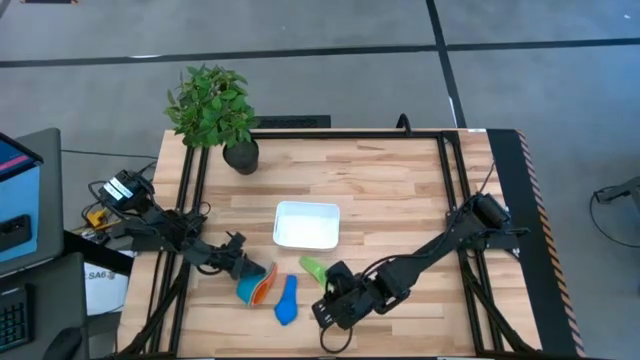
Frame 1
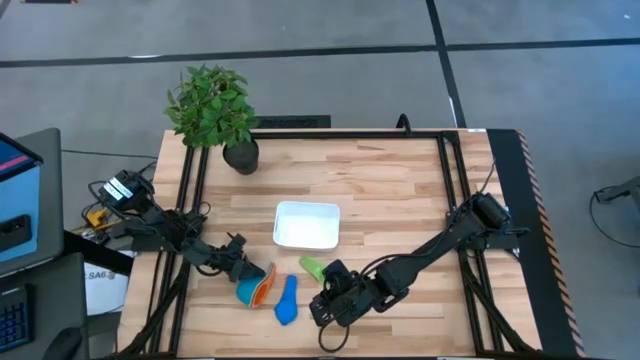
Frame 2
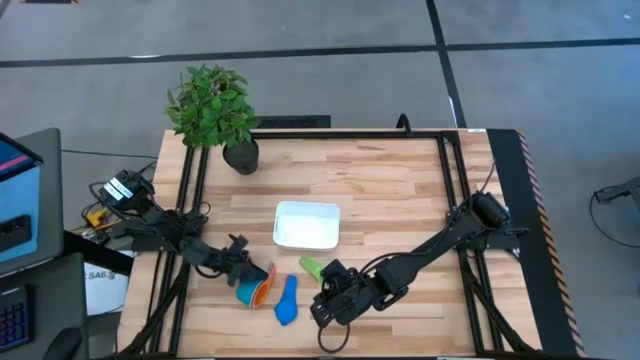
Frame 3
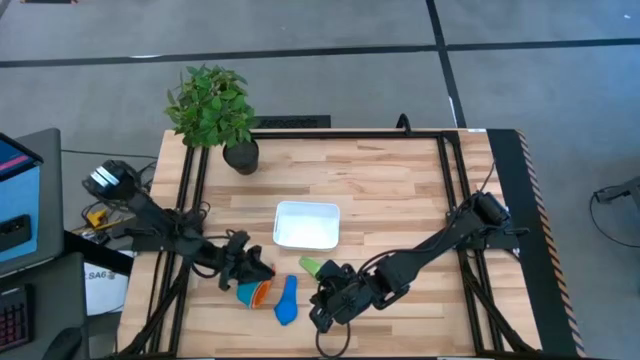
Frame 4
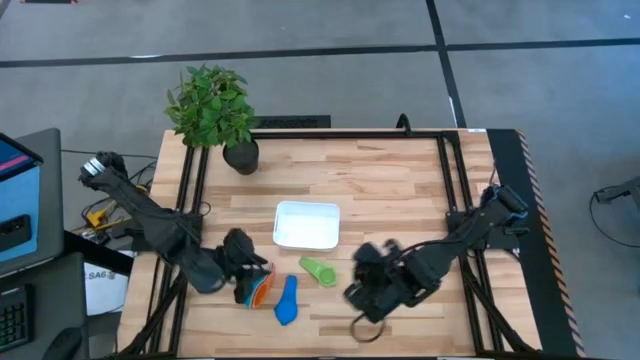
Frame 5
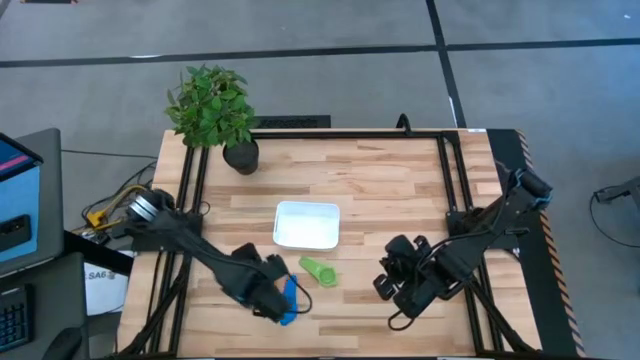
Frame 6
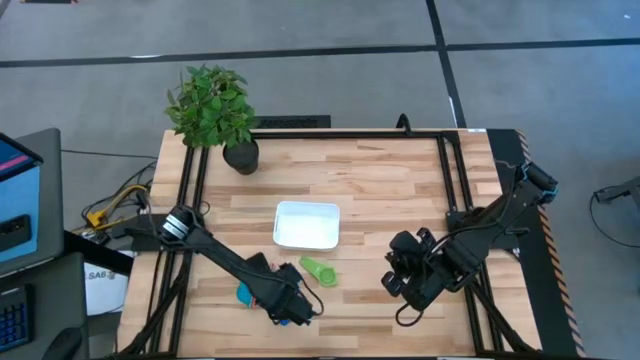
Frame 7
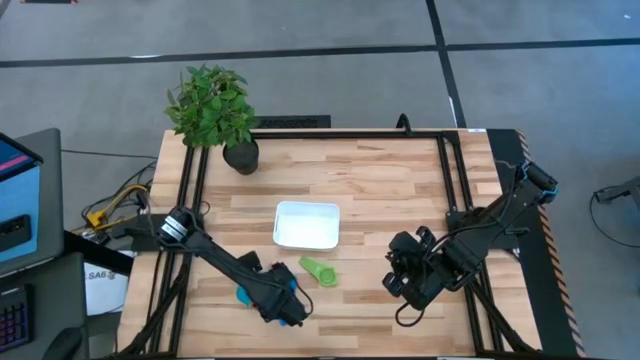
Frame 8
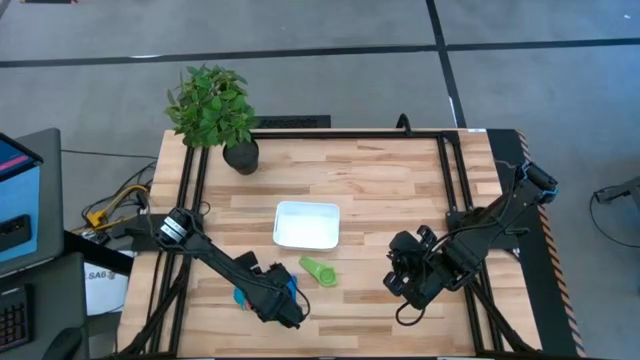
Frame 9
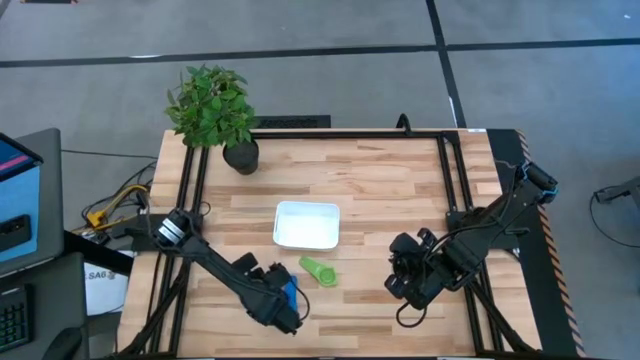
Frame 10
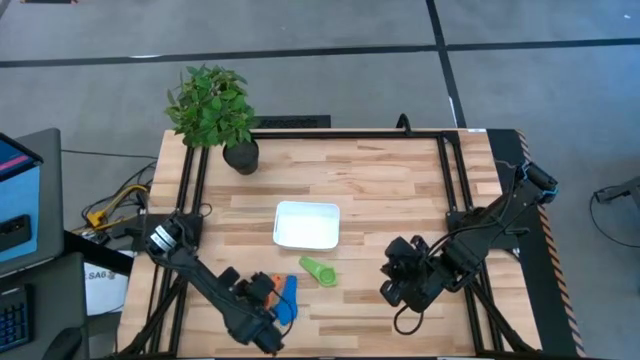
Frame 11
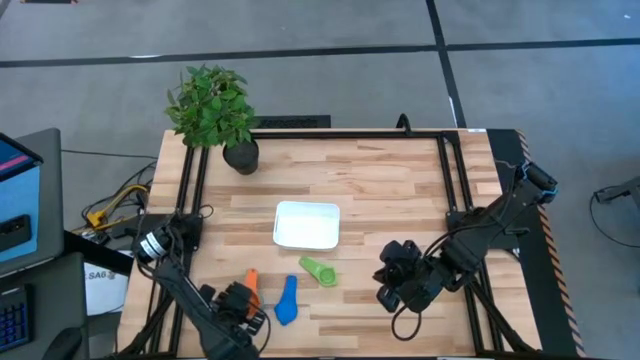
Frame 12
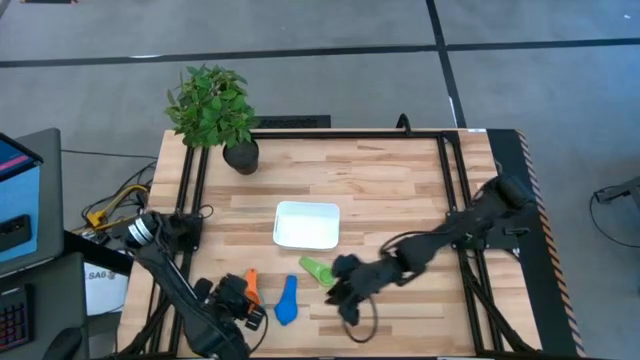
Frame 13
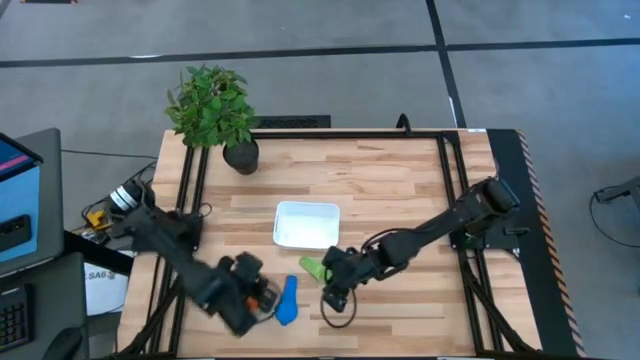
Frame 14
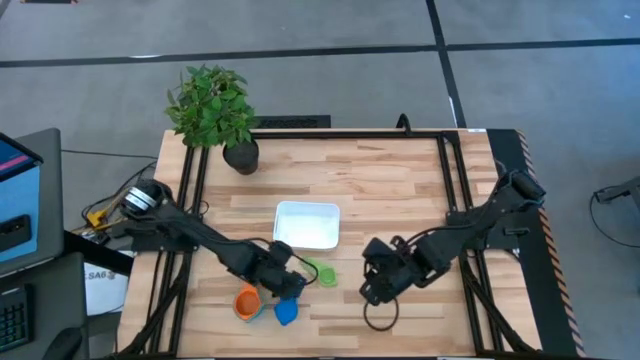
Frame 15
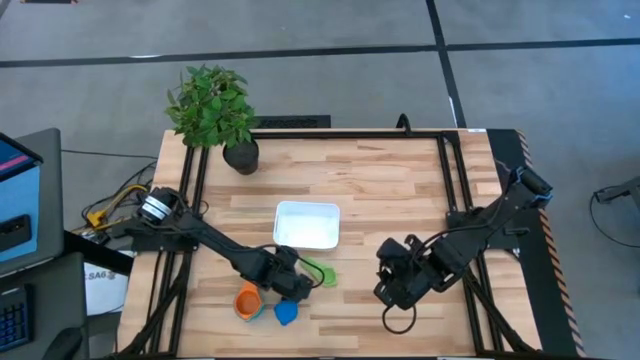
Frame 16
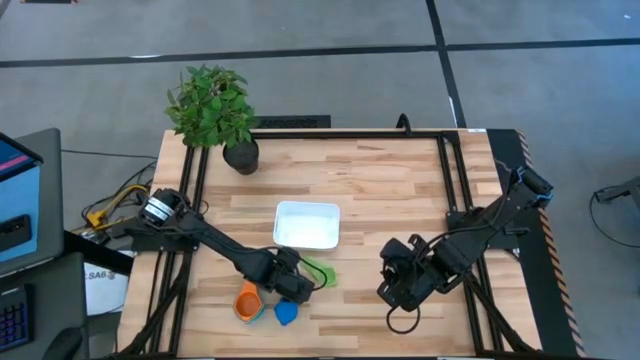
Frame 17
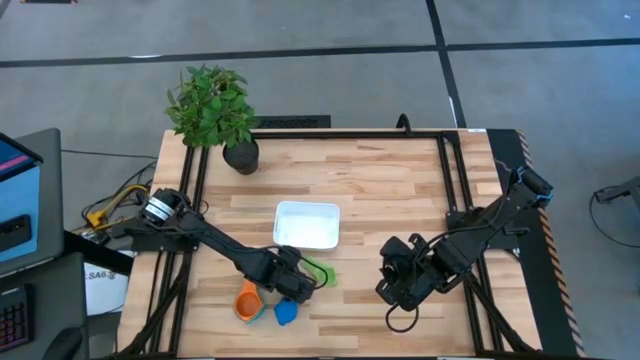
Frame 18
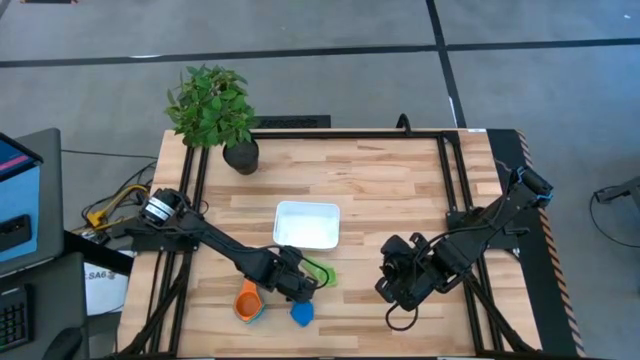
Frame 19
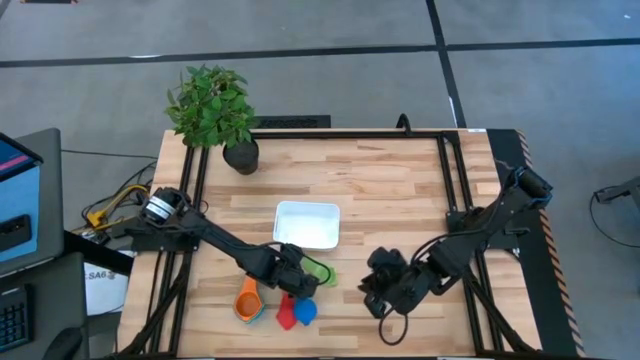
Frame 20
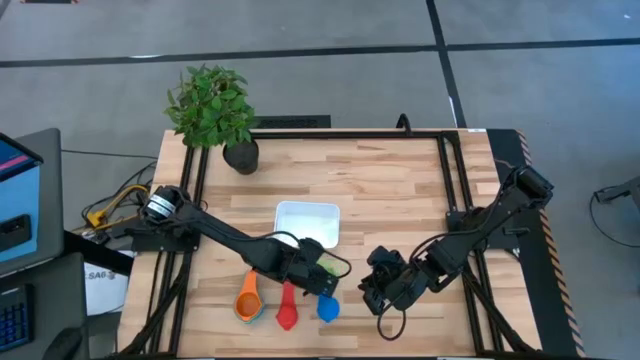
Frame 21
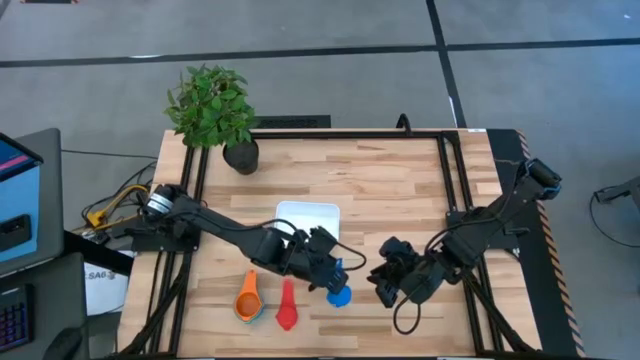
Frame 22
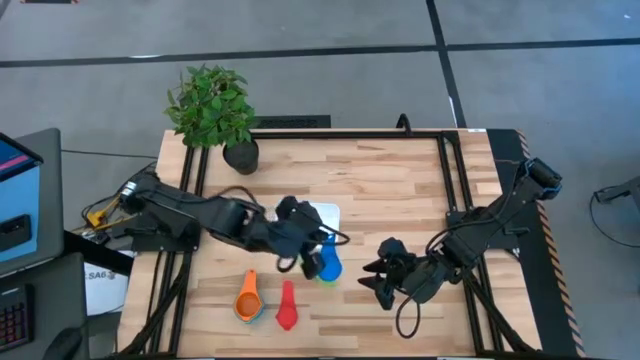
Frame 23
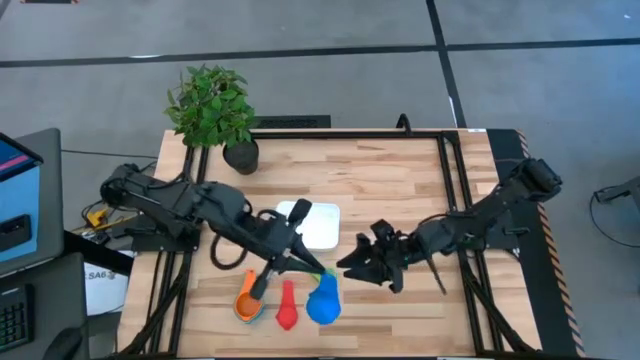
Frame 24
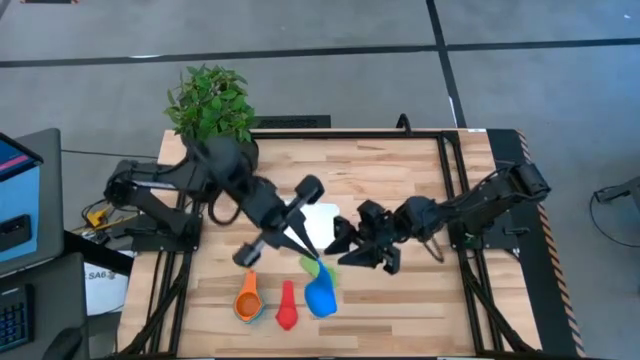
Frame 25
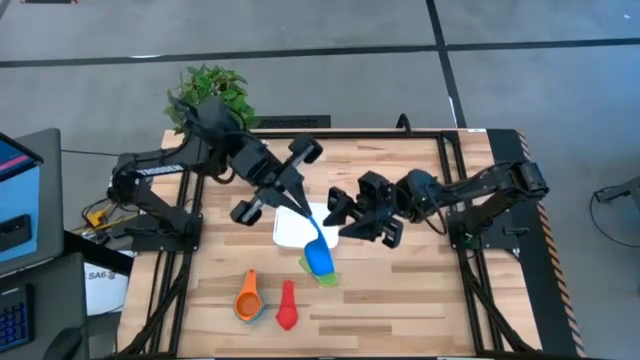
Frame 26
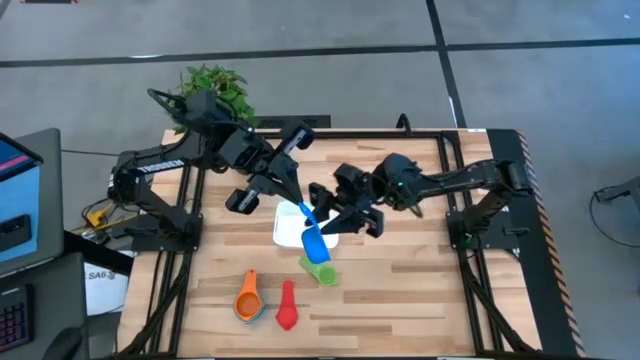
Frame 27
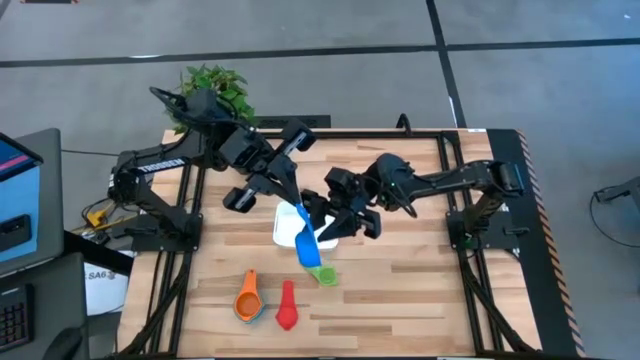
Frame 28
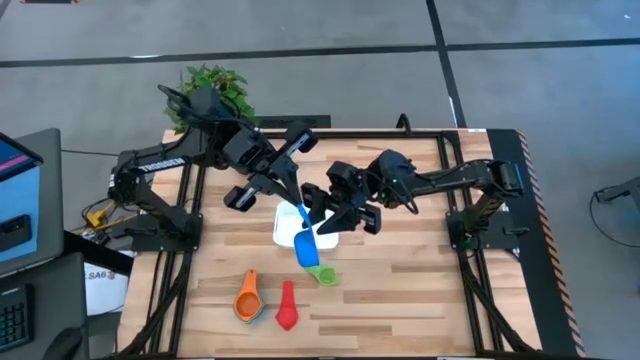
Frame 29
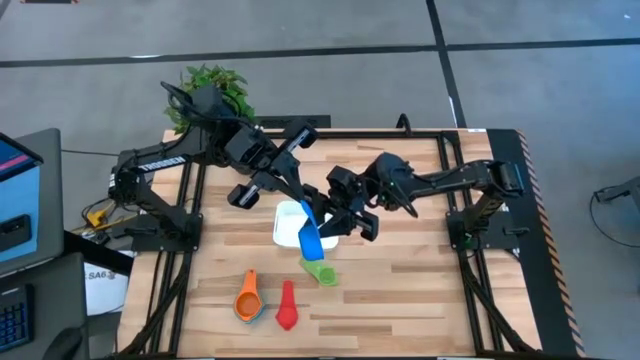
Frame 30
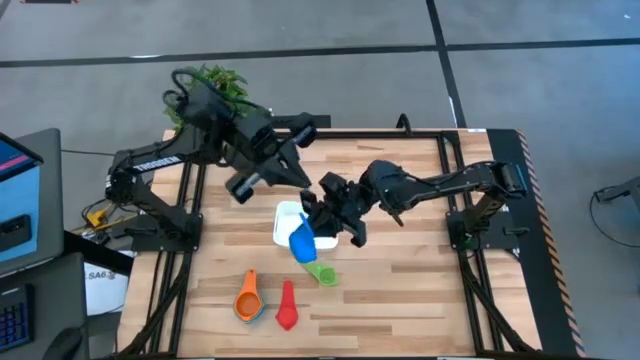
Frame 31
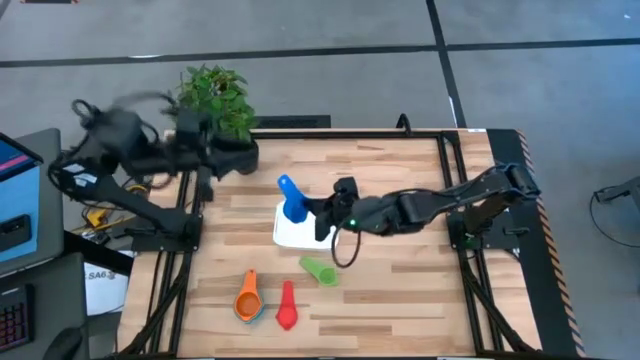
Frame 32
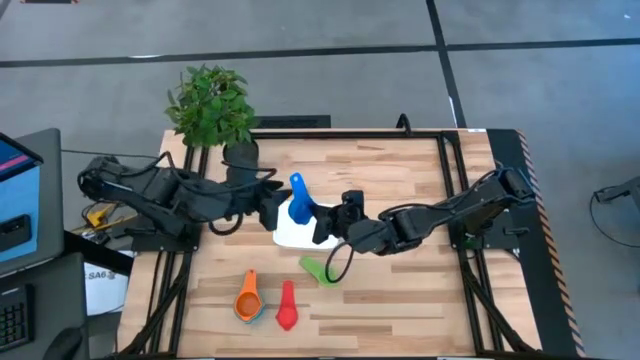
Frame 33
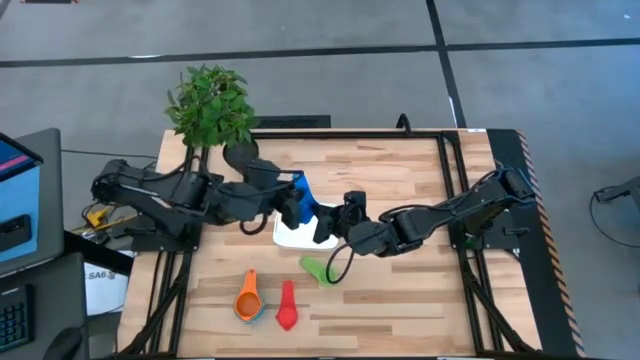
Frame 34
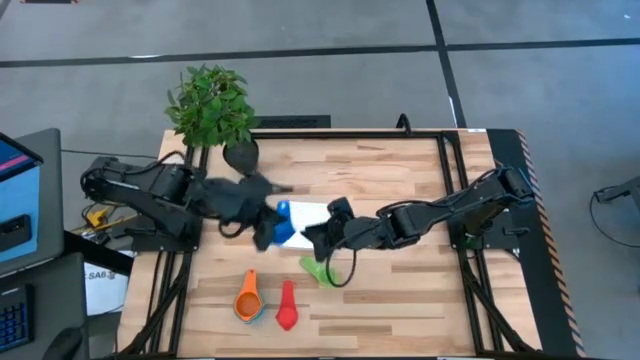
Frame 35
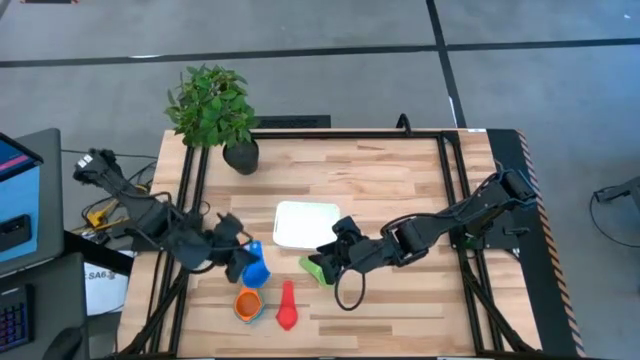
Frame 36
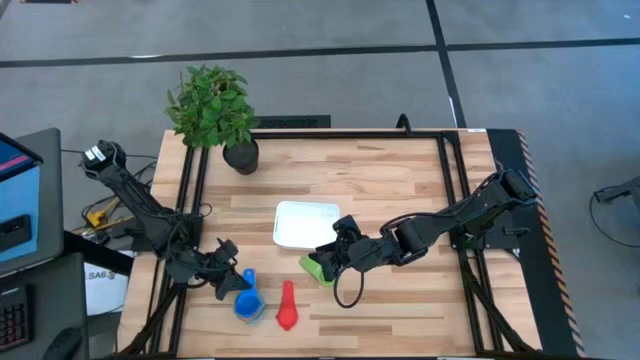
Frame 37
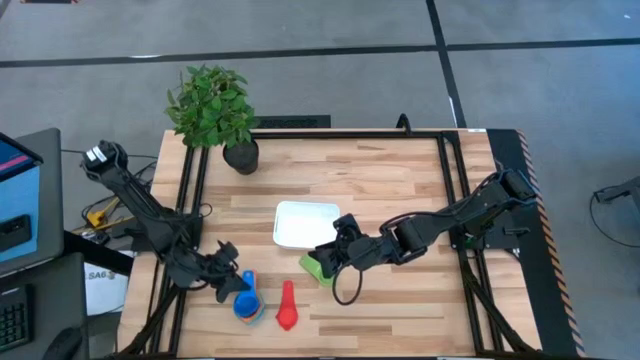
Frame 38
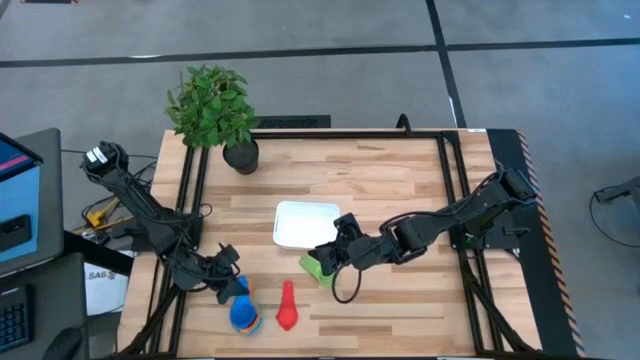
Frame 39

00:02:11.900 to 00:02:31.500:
Task: Nest measuring cups in basket
Stack the blue measuring cup into the orange measuring cup

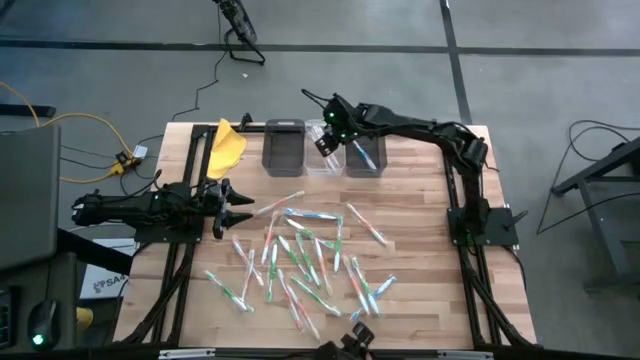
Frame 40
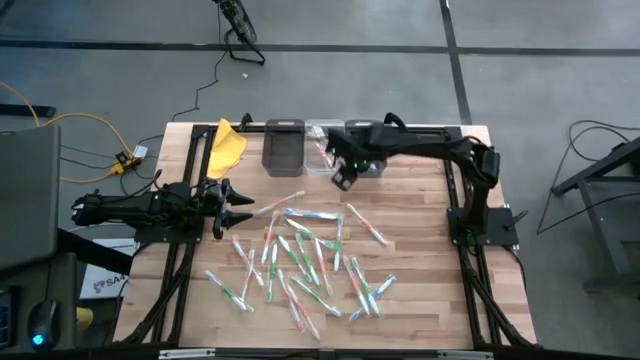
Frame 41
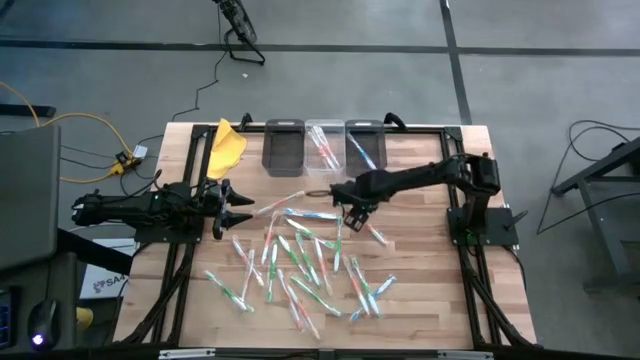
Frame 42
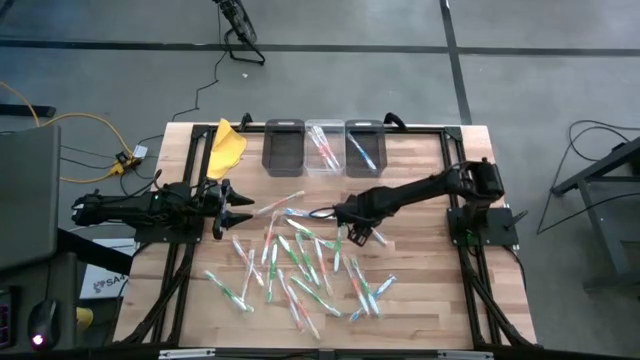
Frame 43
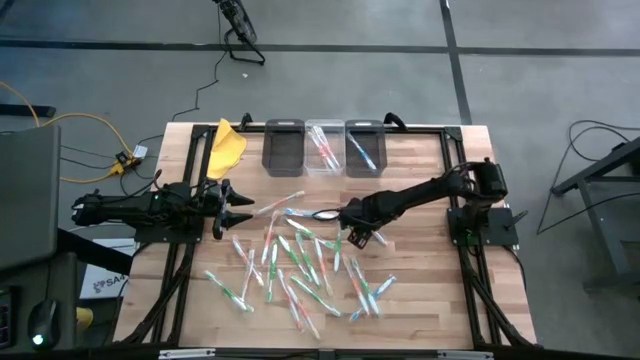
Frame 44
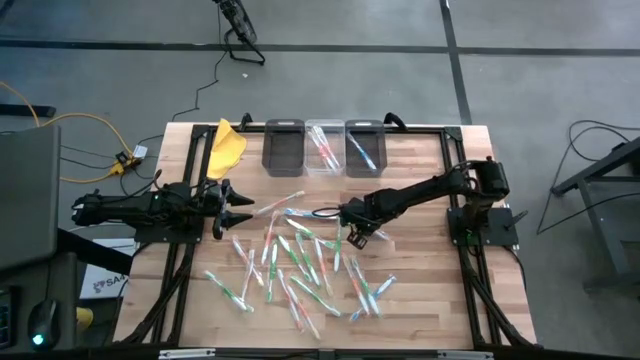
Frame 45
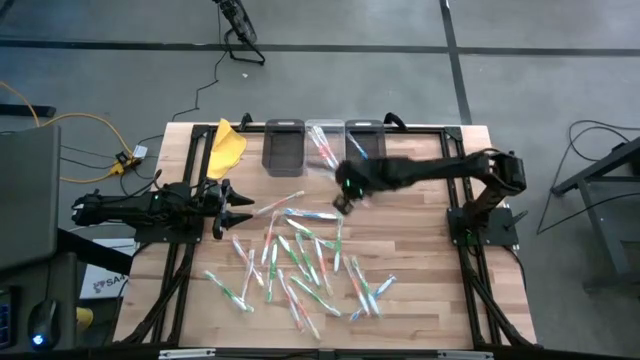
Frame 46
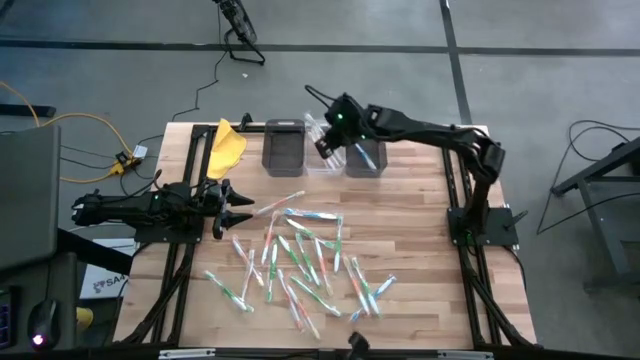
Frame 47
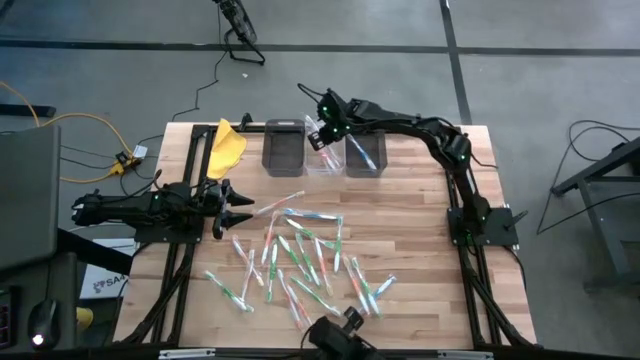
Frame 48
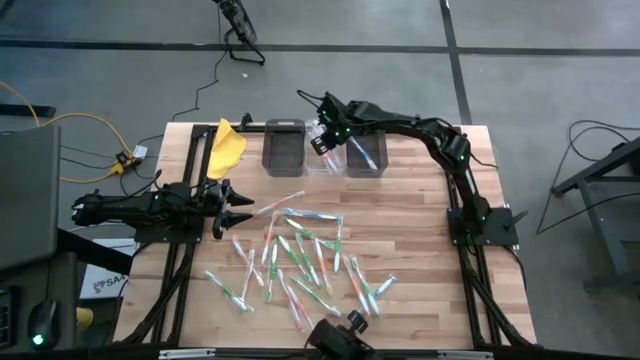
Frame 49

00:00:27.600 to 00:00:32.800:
Task: Pick & Place Toothbrushes
Put the orange toothbrush into the transparent bin
